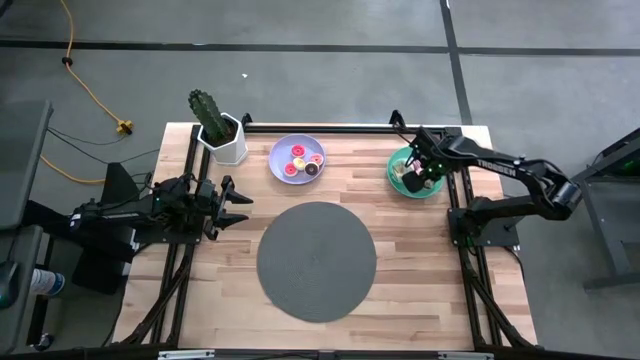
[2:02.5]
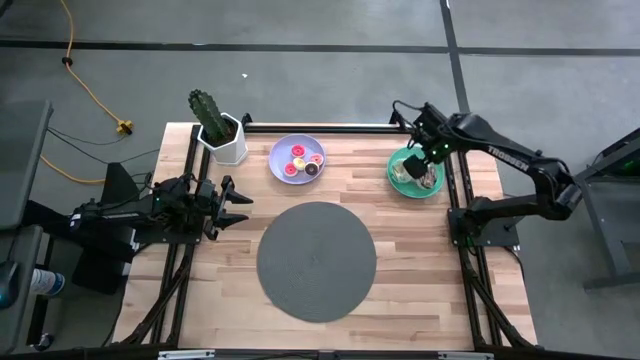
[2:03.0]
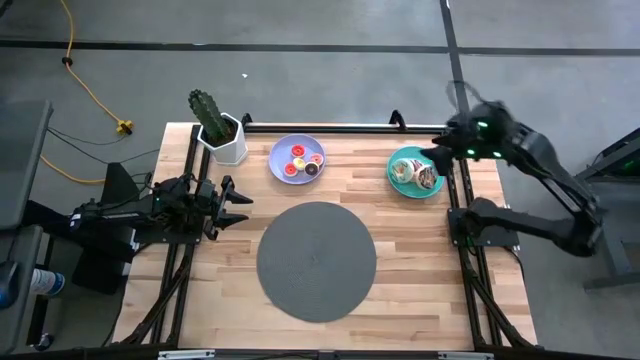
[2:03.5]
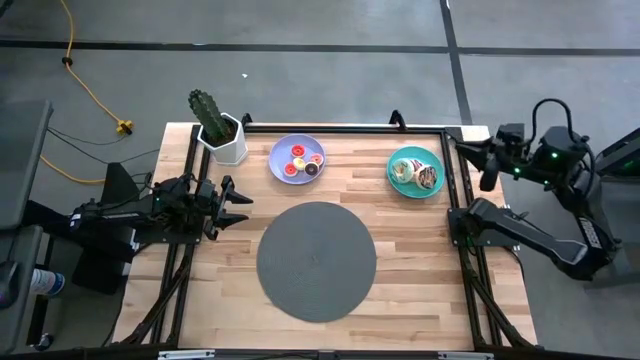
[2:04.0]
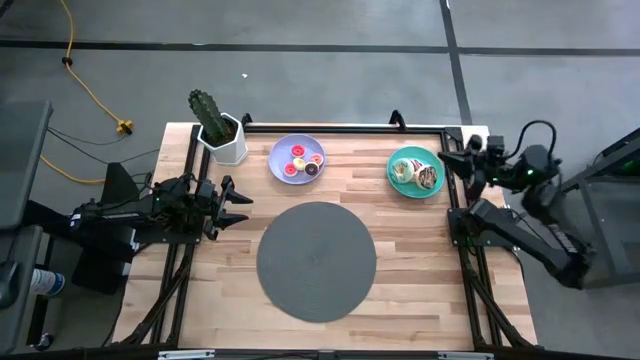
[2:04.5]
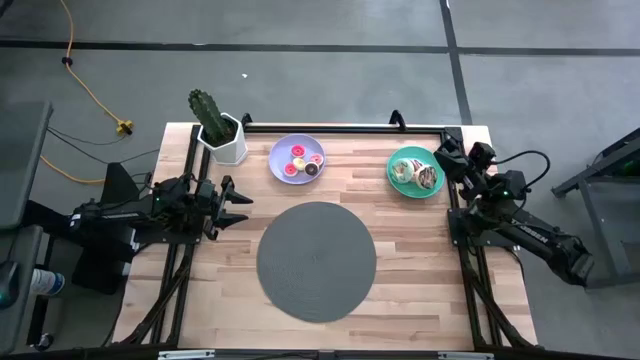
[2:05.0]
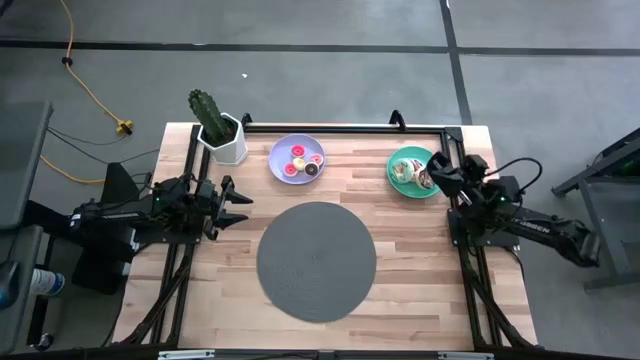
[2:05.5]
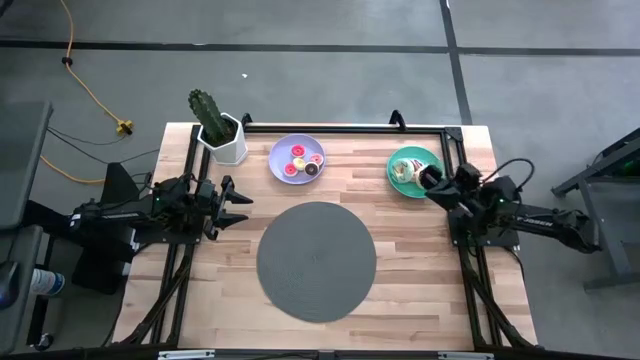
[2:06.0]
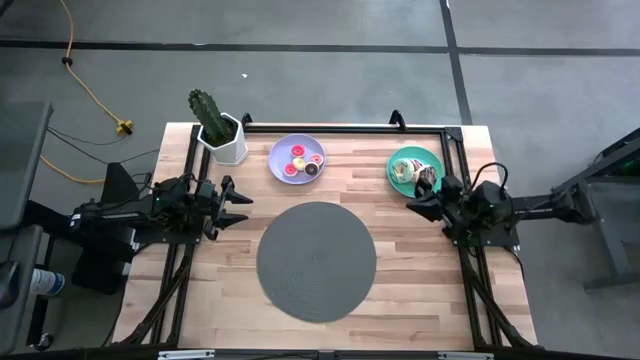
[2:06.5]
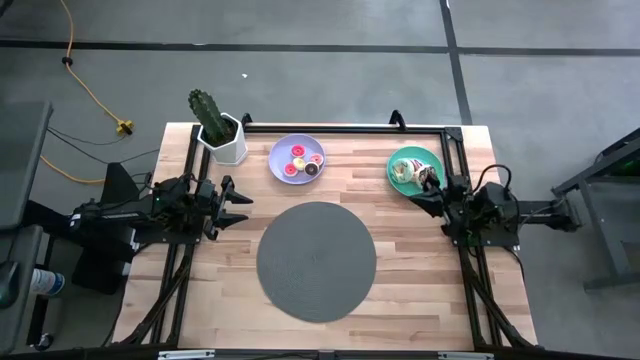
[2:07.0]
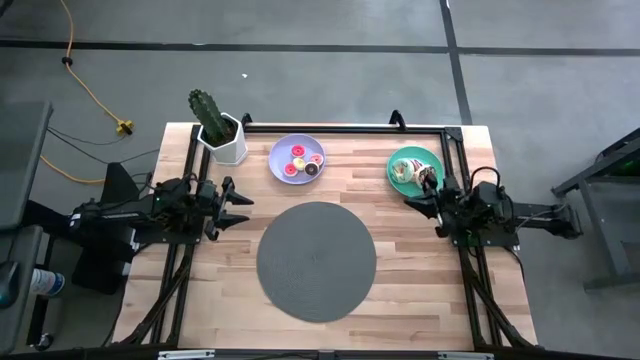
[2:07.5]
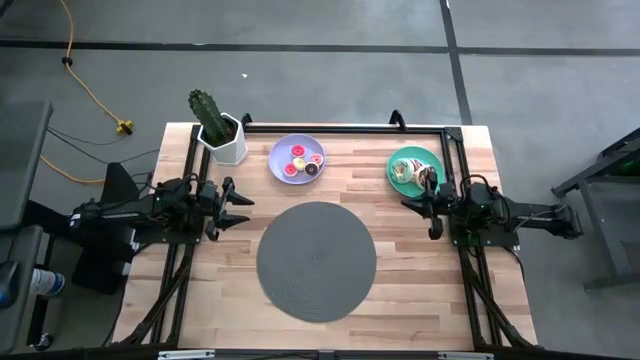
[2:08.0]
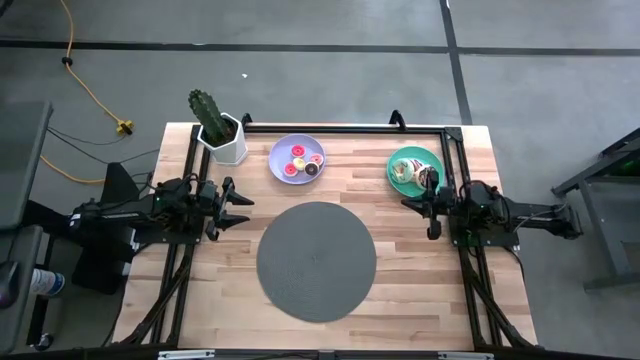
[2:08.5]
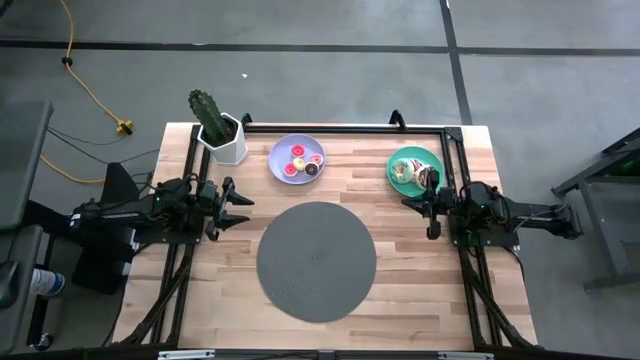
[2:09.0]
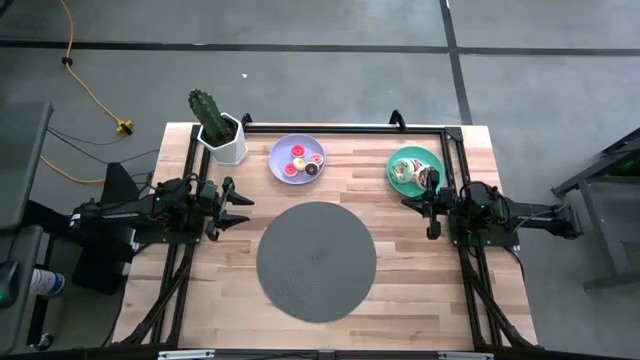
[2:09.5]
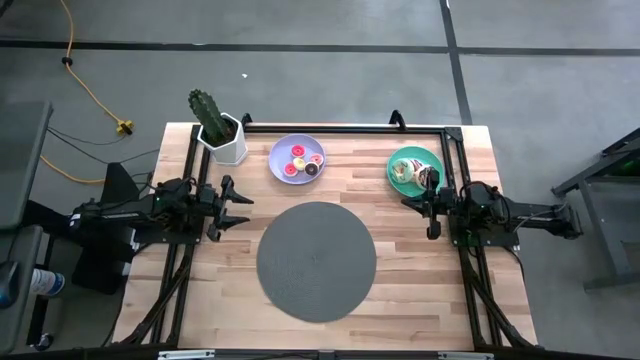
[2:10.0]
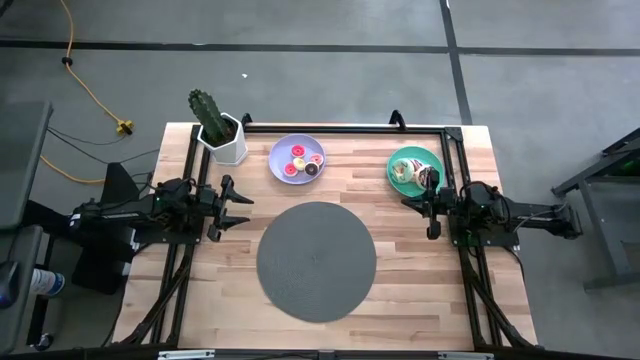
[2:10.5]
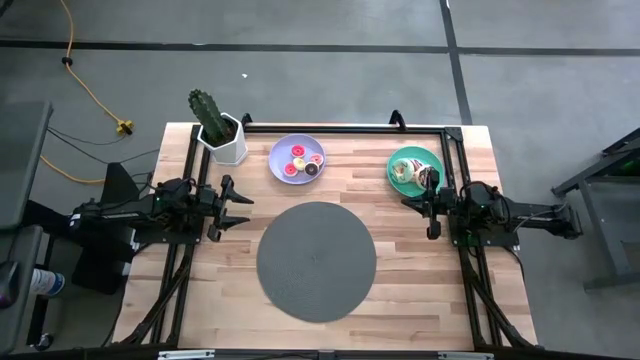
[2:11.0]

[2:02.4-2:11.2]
Task: Pick & Place donuts
Return to Home Position

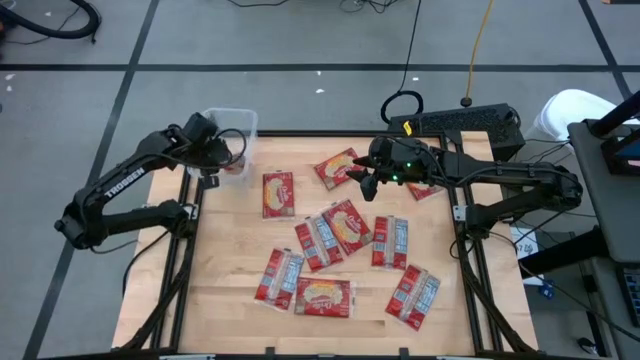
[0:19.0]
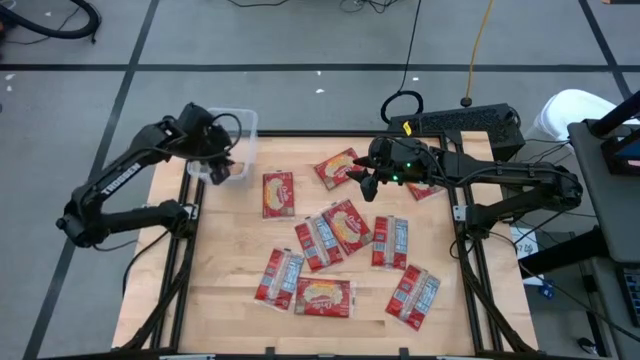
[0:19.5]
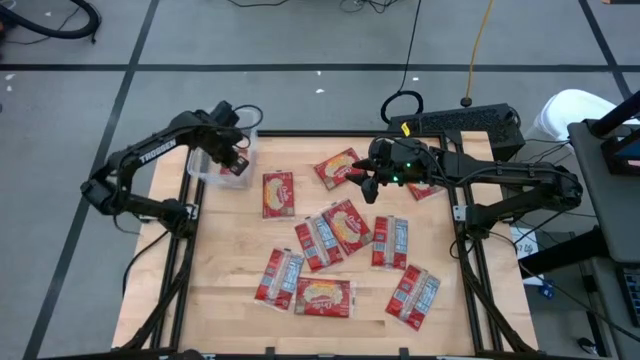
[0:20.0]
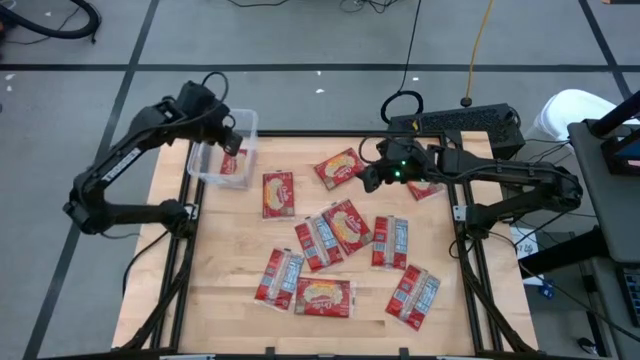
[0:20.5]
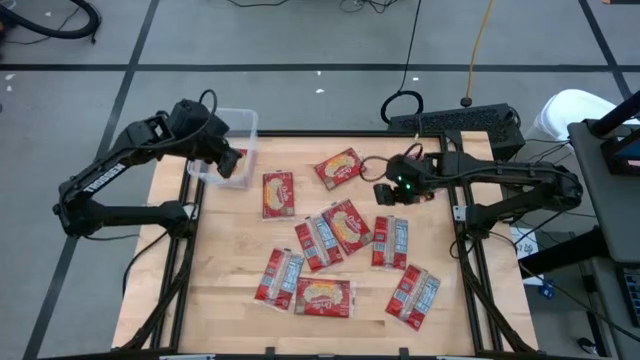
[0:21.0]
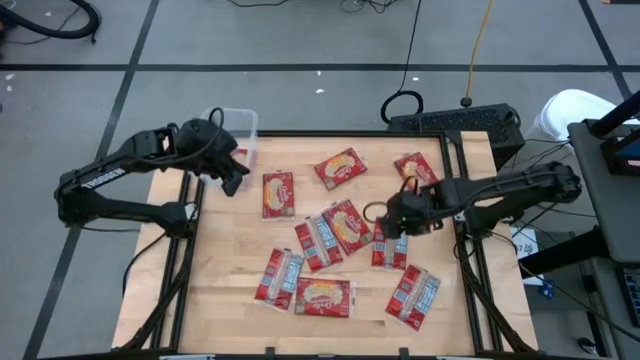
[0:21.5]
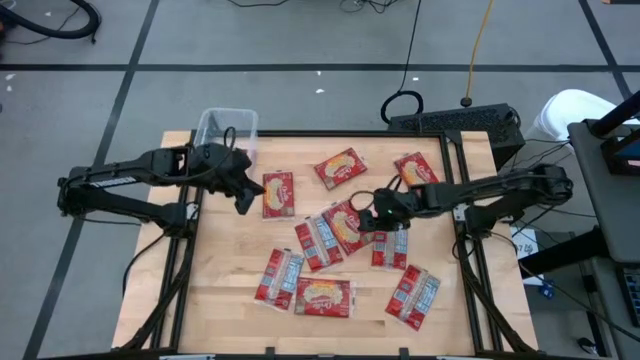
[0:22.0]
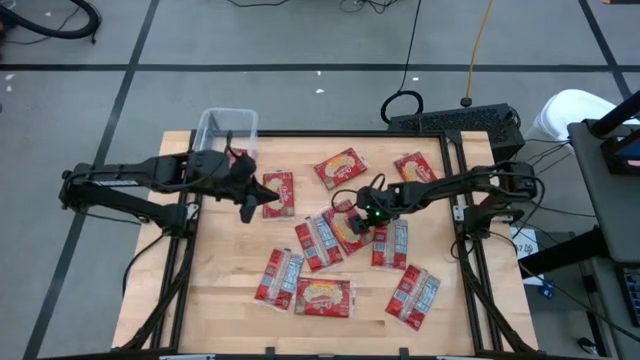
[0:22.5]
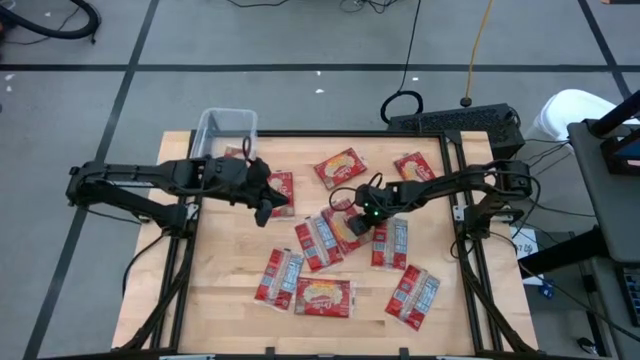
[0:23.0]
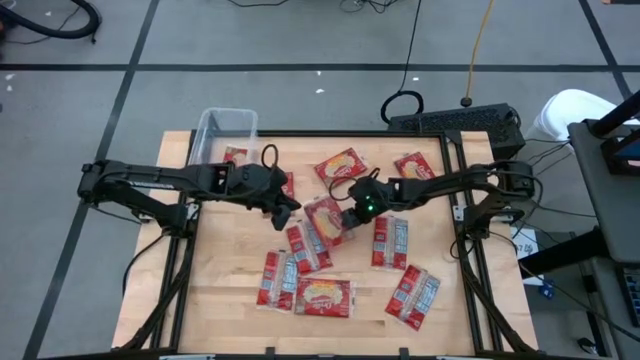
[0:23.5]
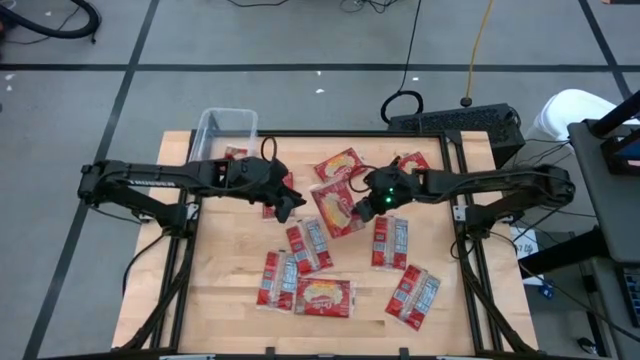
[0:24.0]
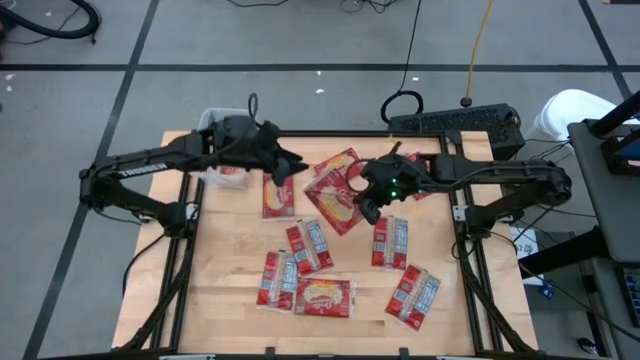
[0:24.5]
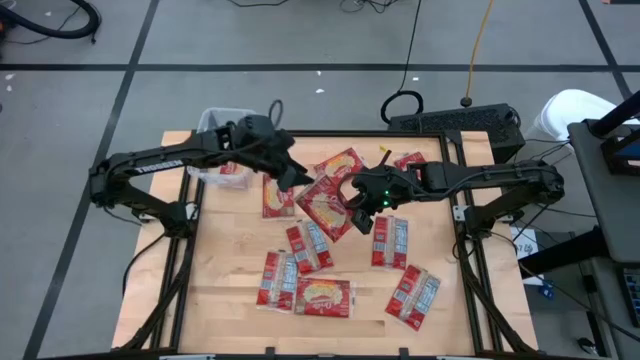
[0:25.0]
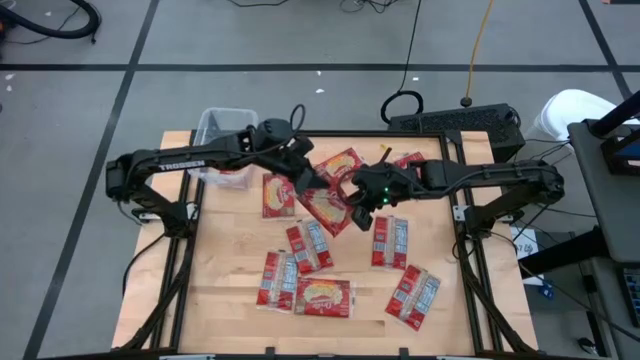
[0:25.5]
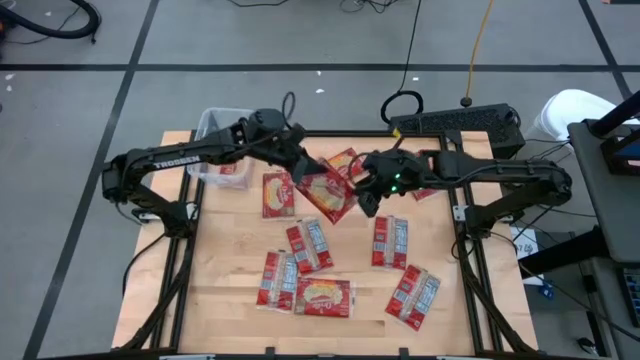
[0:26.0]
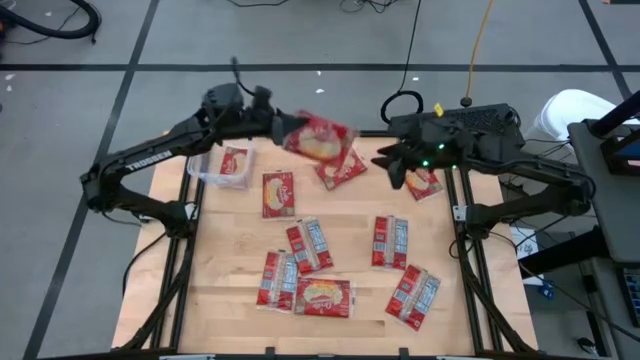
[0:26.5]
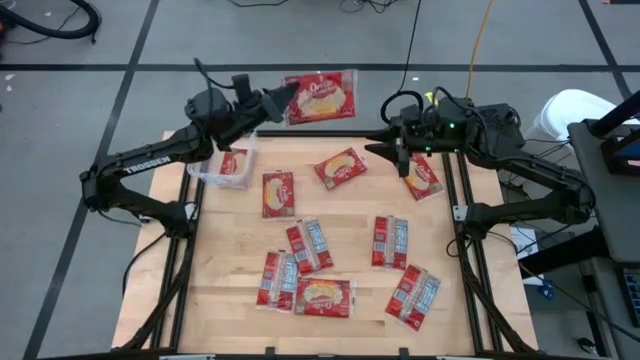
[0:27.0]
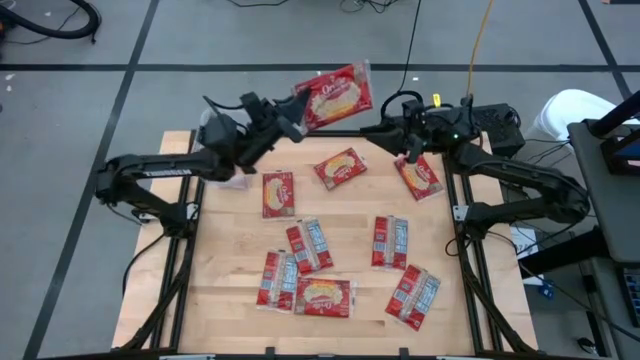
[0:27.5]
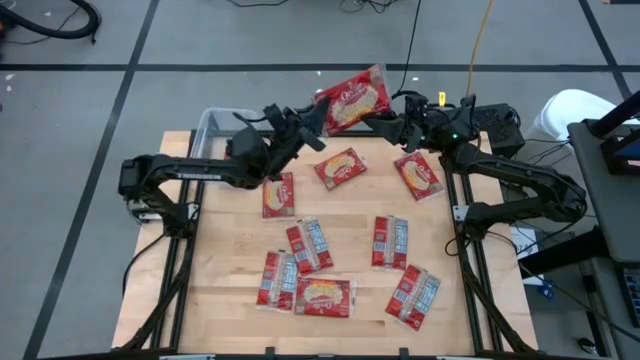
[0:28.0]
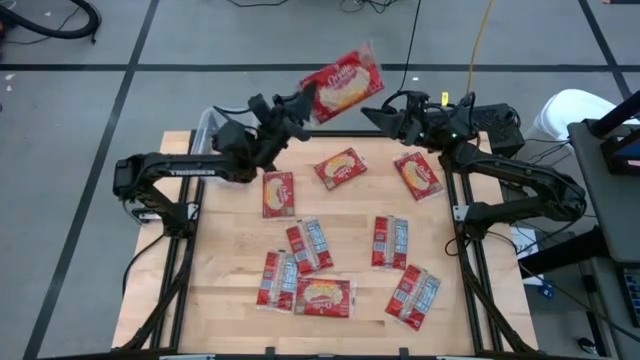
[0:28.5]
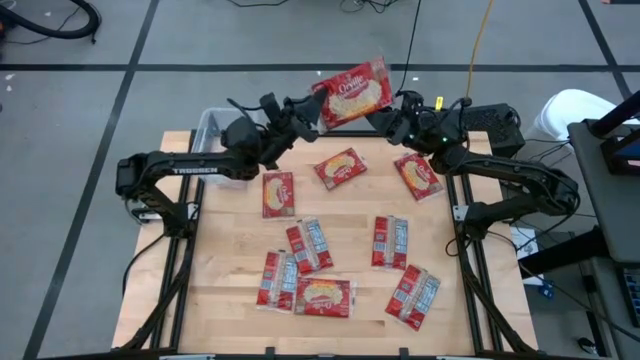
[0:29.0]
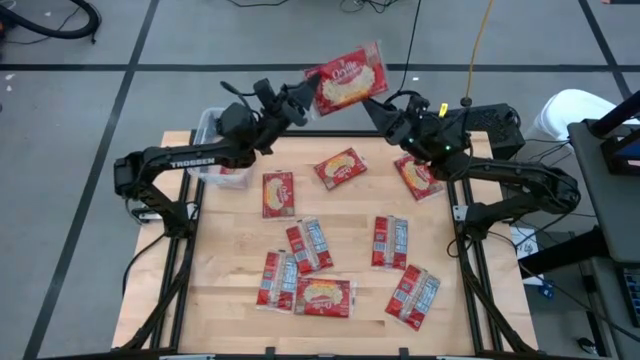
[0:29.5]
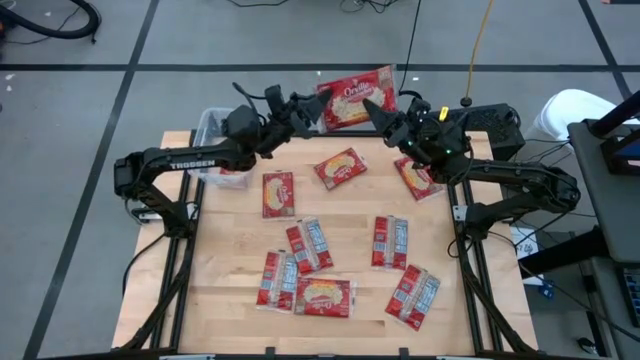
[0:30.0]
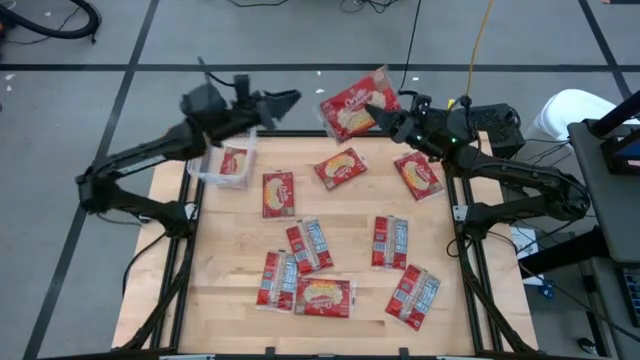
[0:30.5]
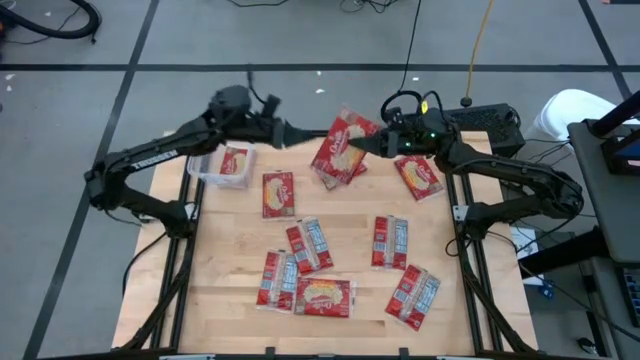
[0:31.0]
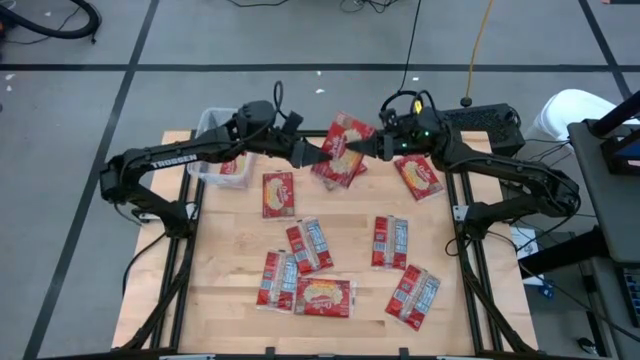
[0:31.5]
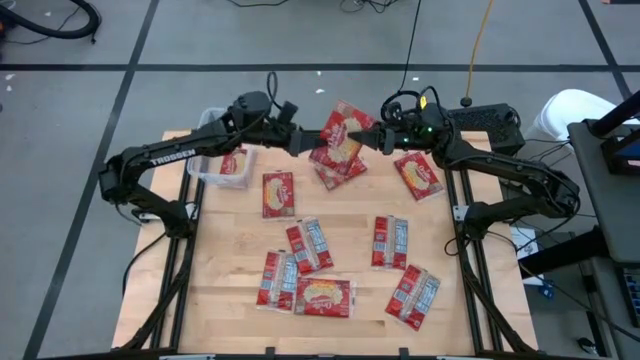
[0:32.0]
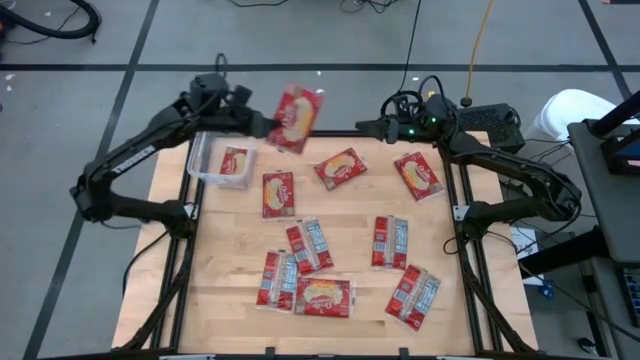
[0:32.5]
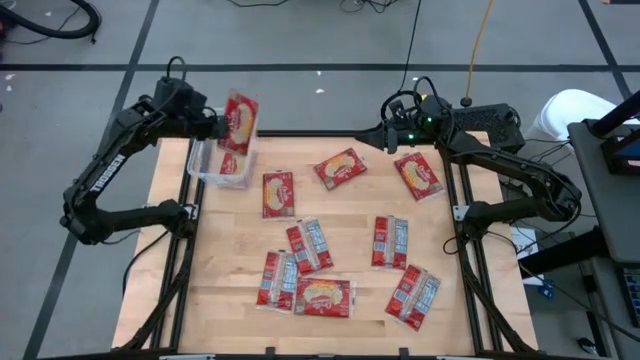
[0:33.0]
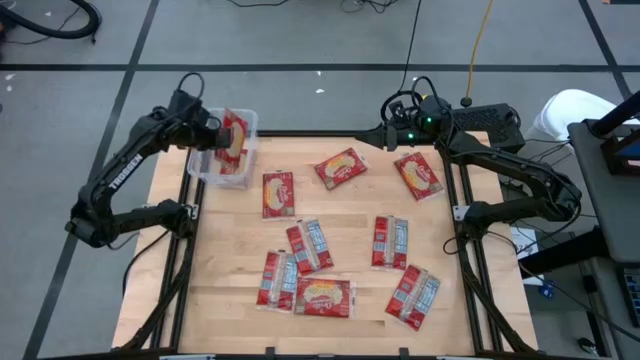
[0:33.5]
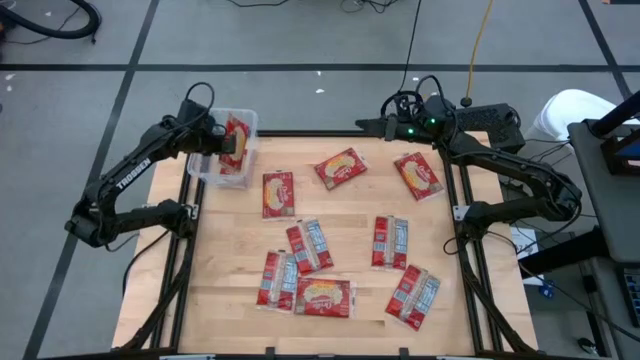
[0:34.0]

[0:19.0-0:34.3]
Task: Sort popcorn bags into baskets
Put the red popcorn bag into the transparent container
